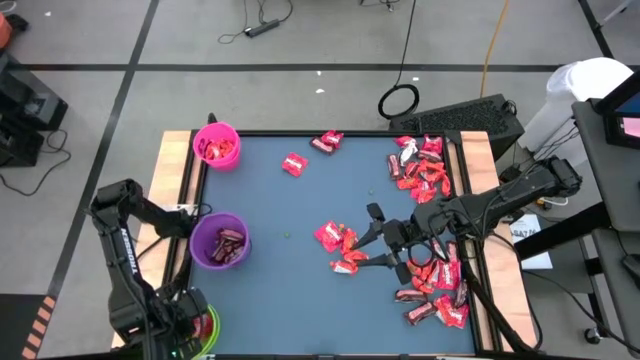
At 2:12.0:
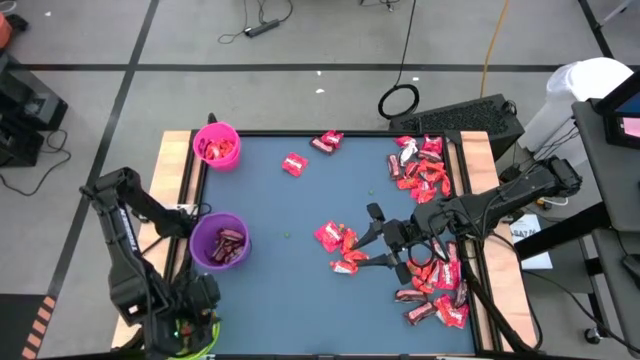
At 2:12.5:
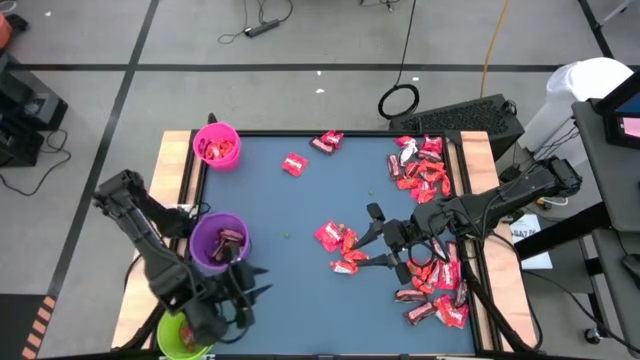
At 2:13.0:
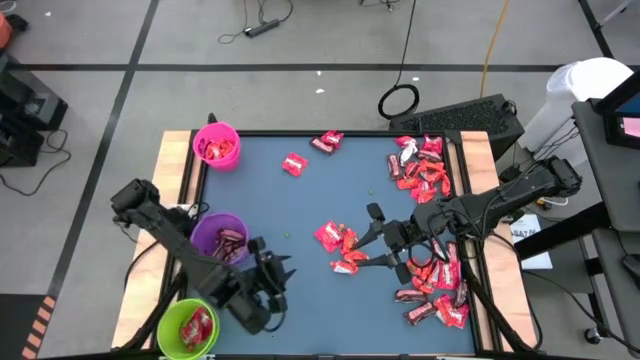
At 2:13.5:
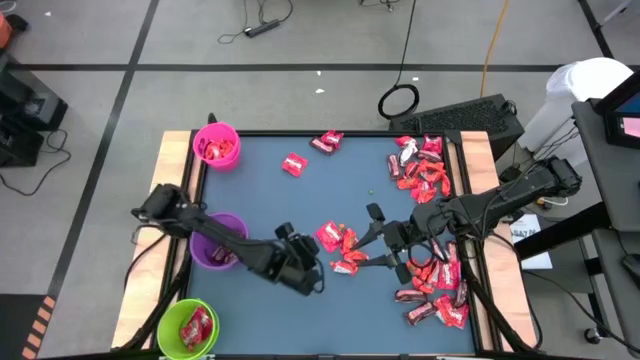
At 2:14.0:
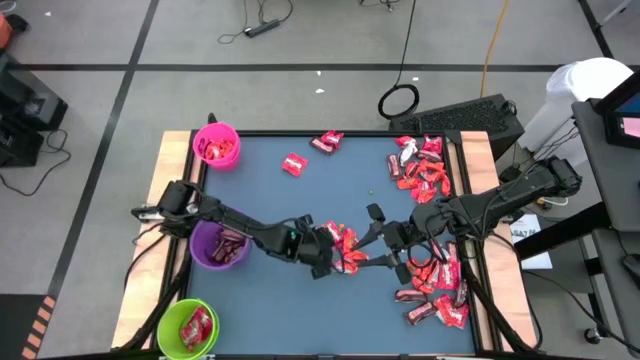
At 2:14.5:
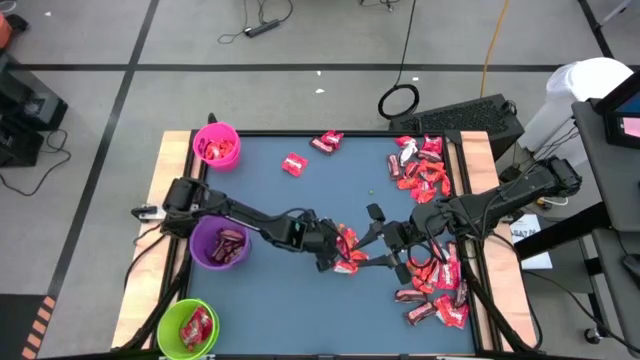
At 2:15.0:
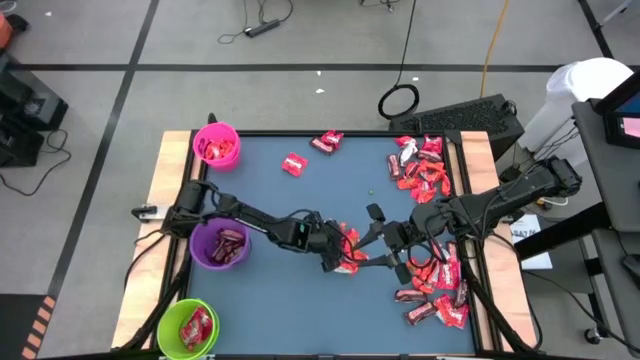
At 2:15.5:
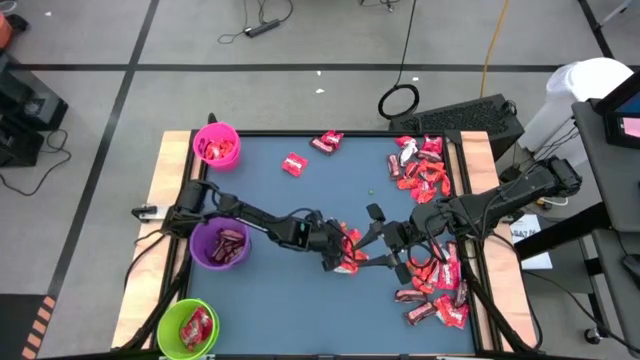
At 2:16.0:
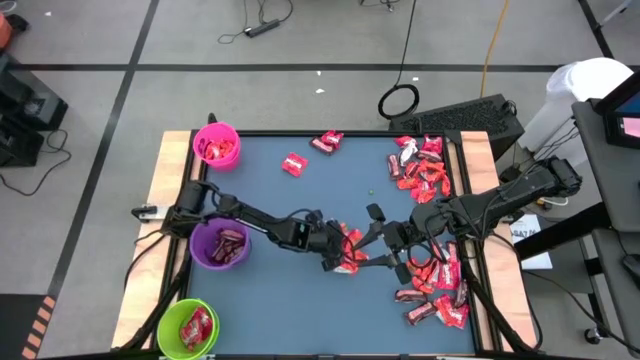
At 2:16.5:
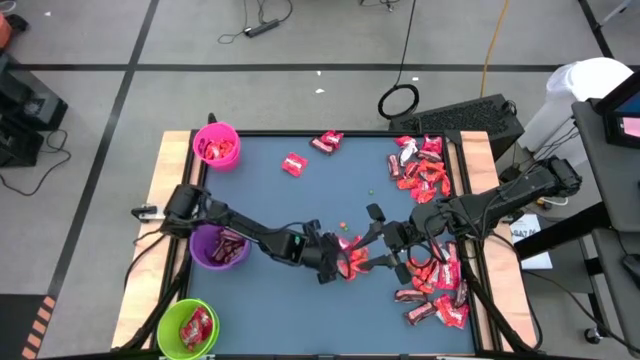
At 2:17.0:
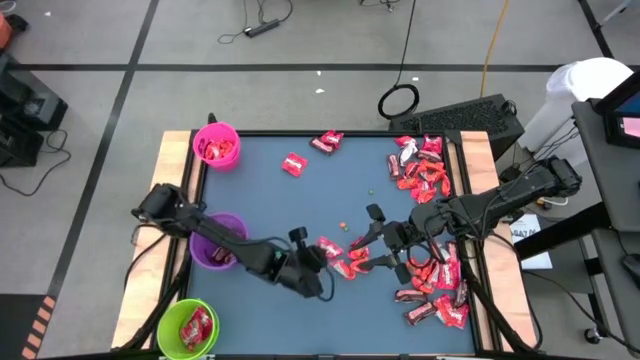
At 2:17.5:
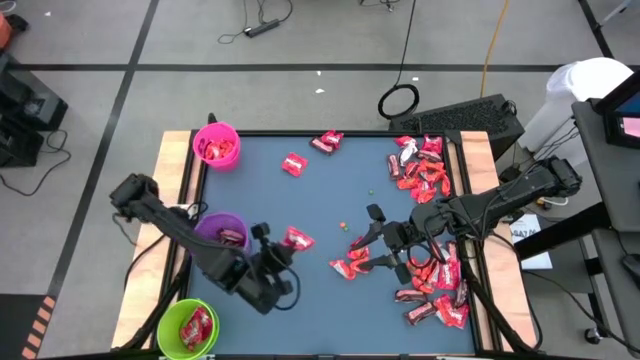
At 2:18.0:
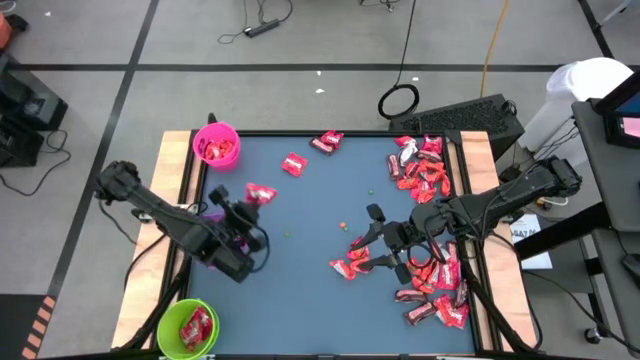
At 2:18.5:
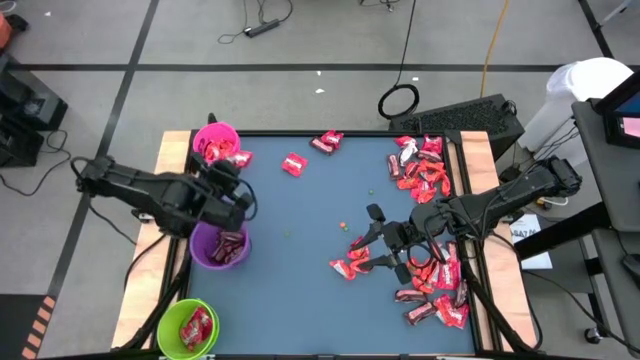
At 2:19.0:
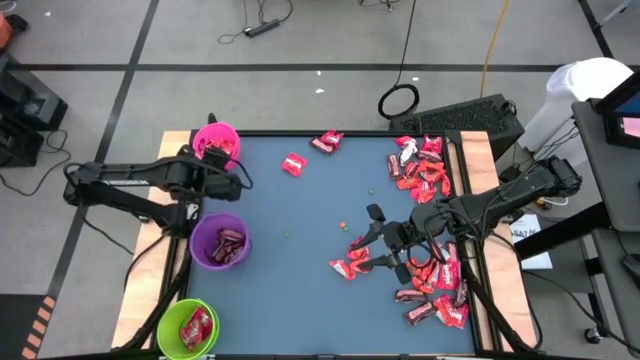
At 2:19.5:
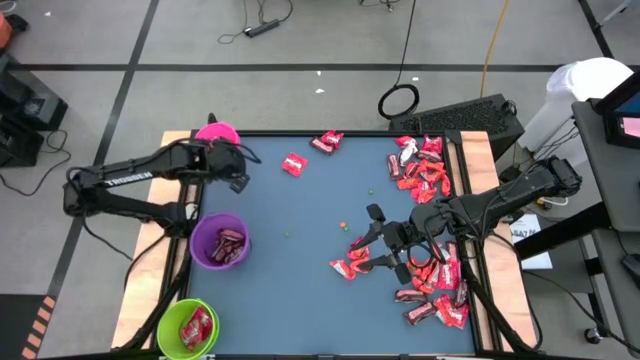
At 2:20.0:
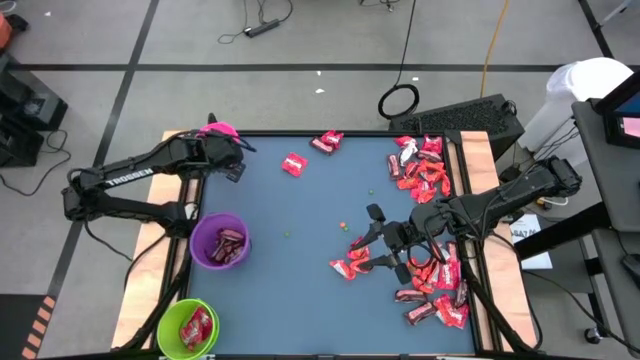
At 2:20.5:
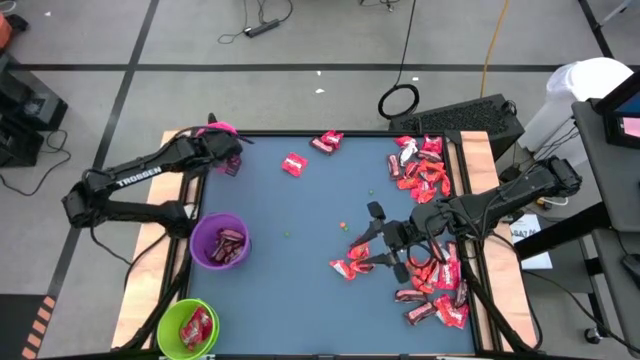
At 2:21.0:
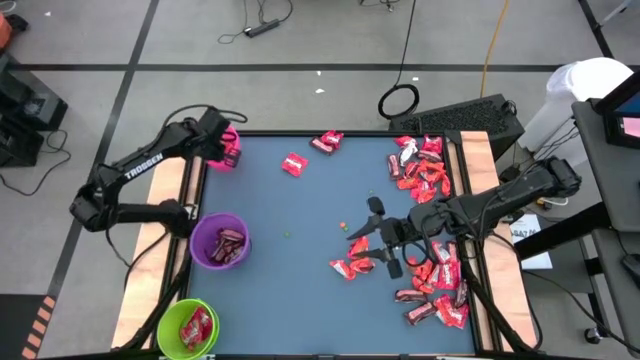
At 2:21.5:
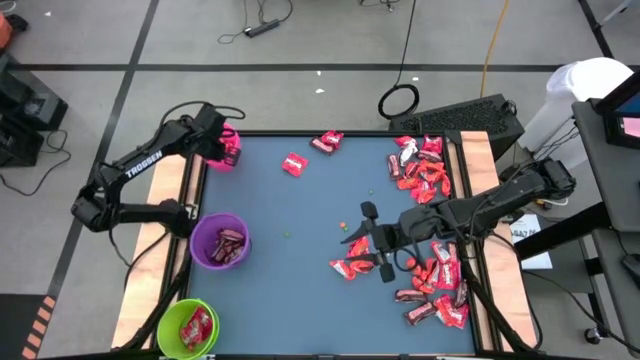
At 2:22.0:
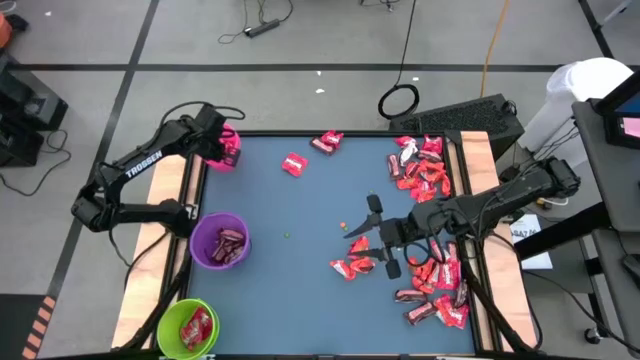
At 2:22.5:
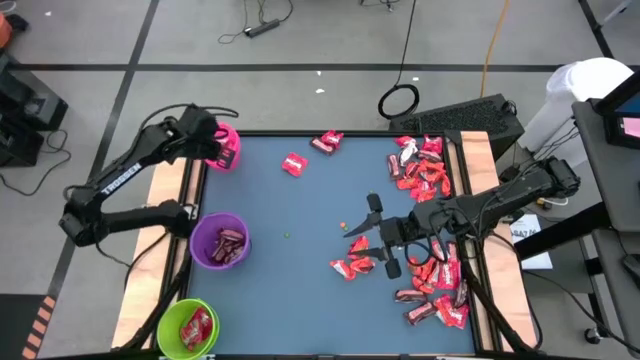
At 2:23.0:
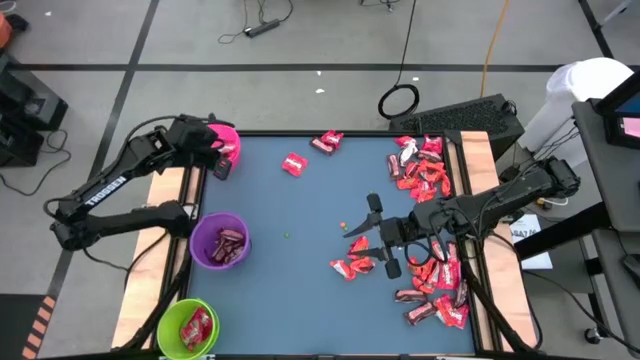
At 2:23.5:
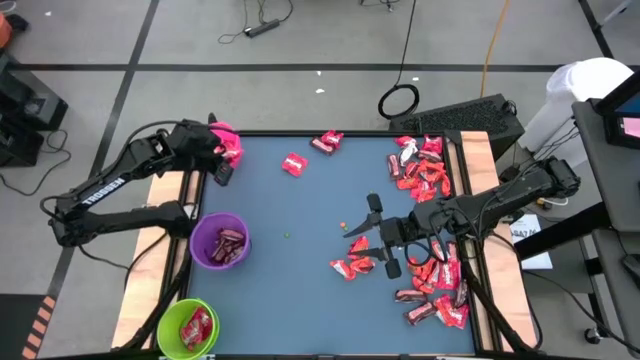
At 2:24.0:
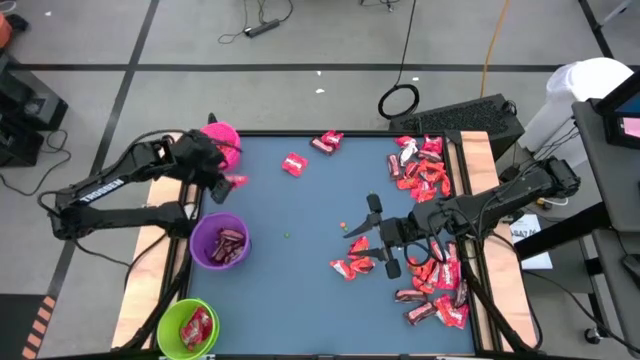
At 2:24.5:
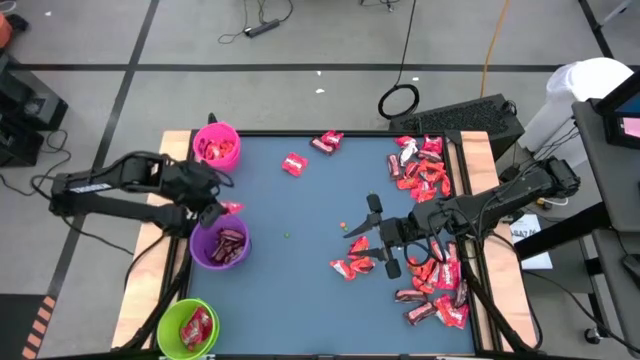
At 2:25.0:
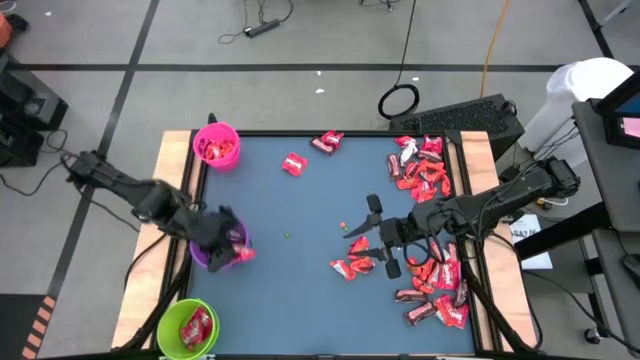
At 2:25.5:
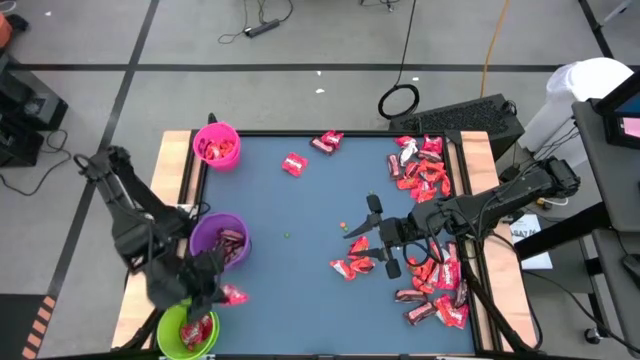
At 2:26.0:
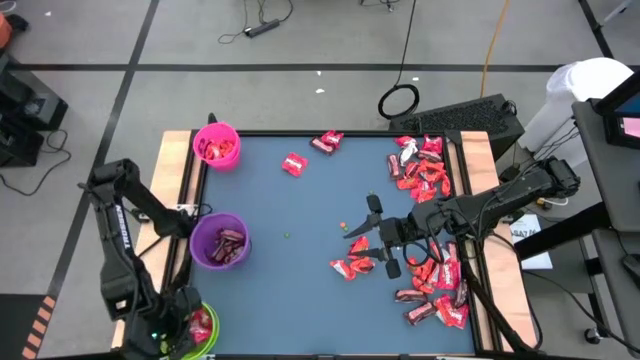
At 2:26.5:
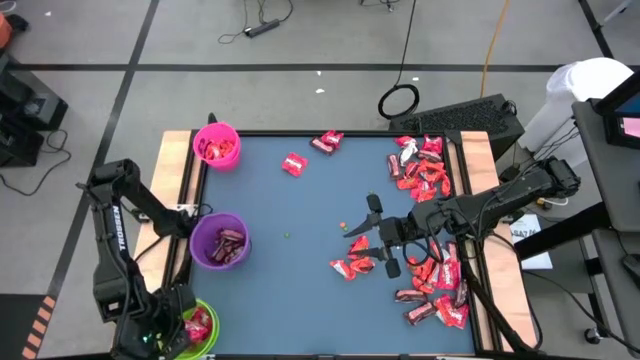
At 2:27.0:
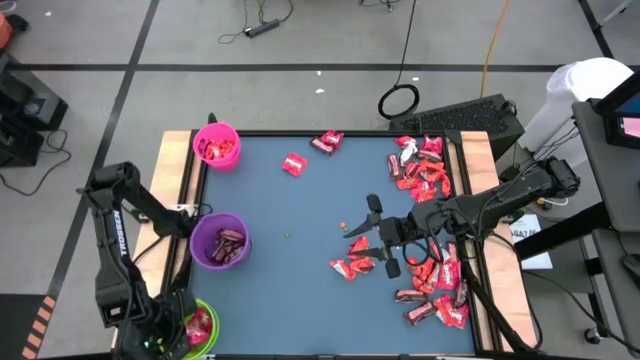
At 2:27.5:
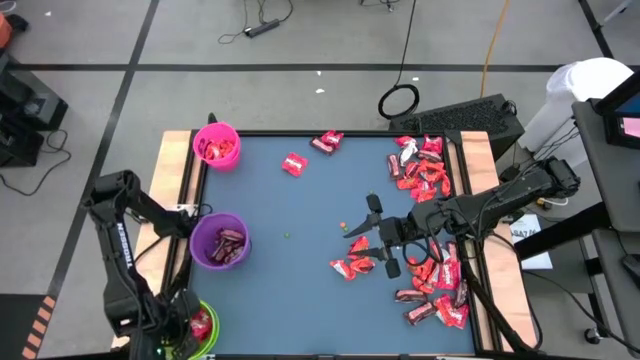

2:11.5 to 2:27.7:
Task: Organize candy in baskets
Put the red candy into the green bucket

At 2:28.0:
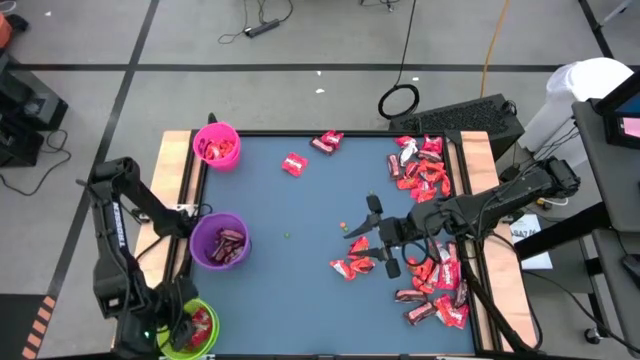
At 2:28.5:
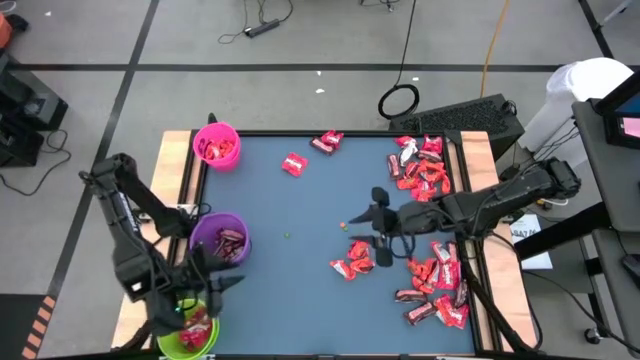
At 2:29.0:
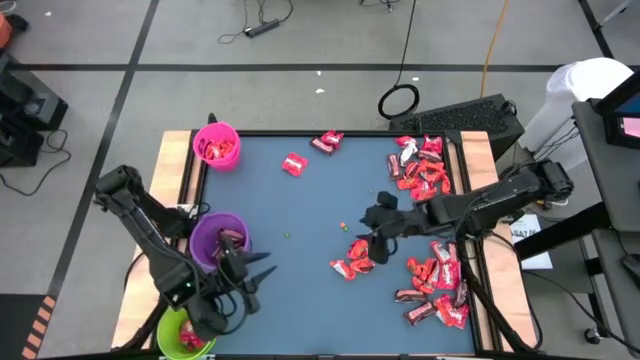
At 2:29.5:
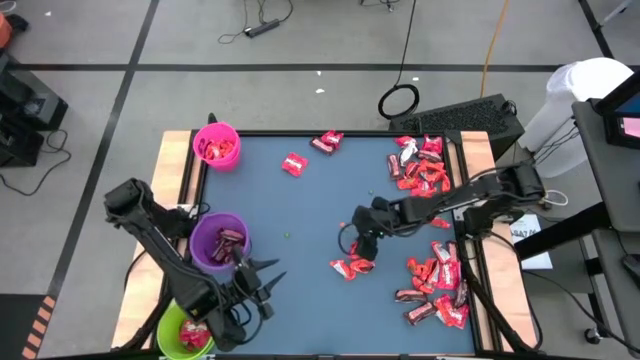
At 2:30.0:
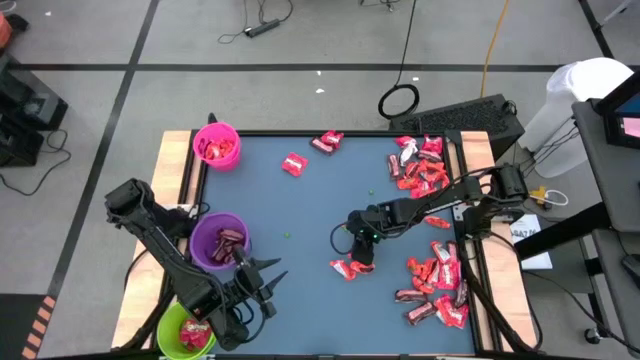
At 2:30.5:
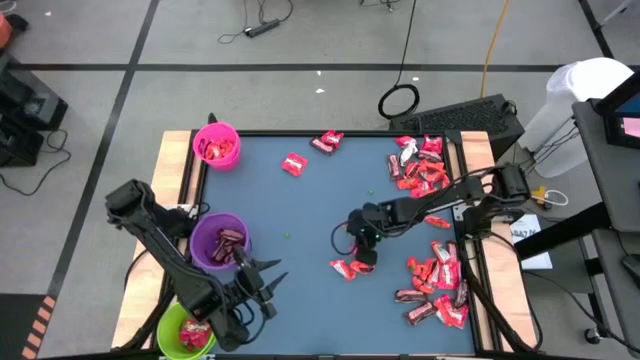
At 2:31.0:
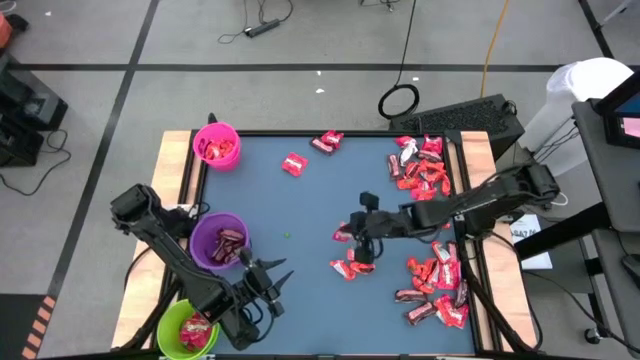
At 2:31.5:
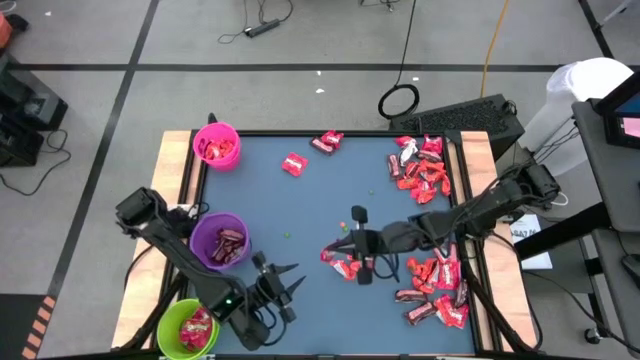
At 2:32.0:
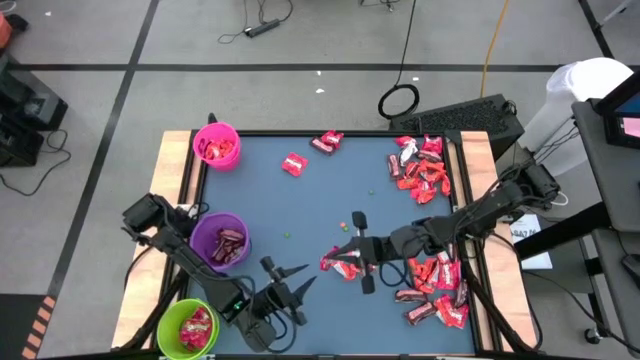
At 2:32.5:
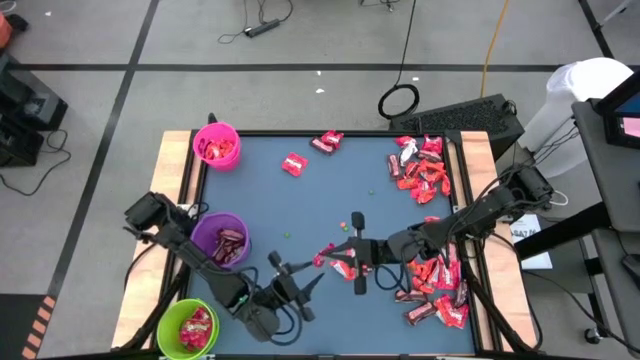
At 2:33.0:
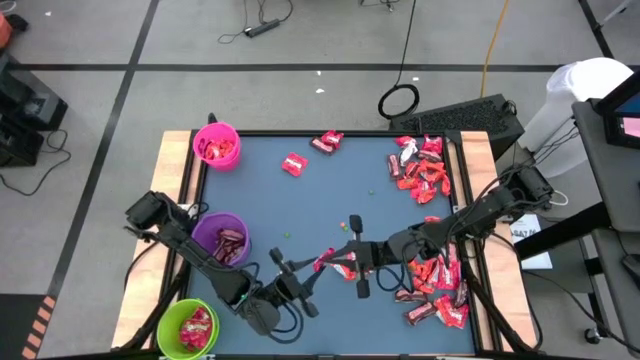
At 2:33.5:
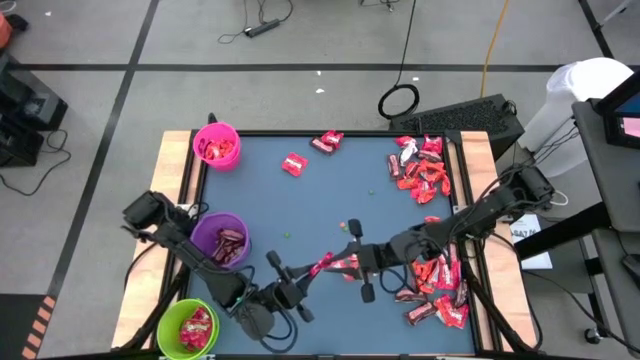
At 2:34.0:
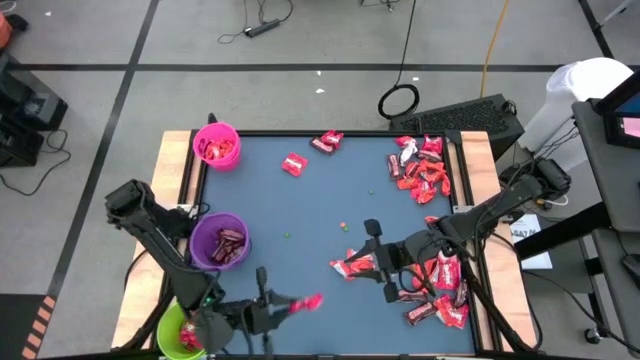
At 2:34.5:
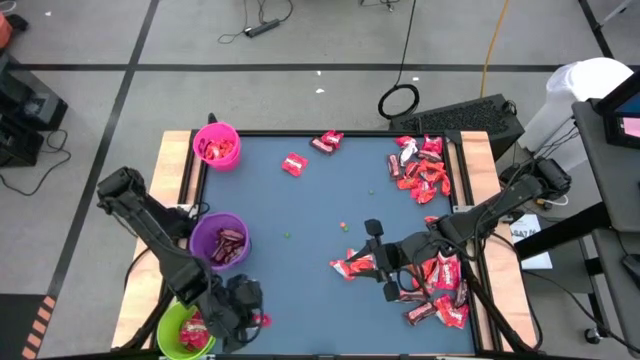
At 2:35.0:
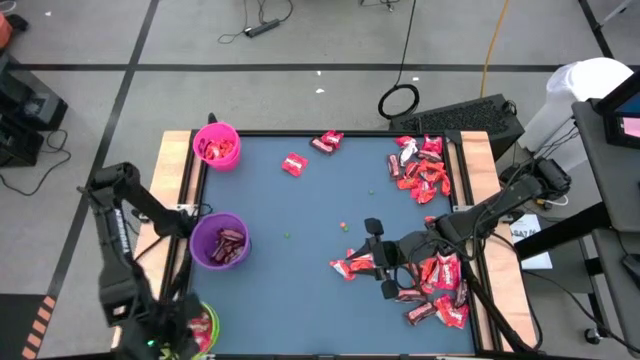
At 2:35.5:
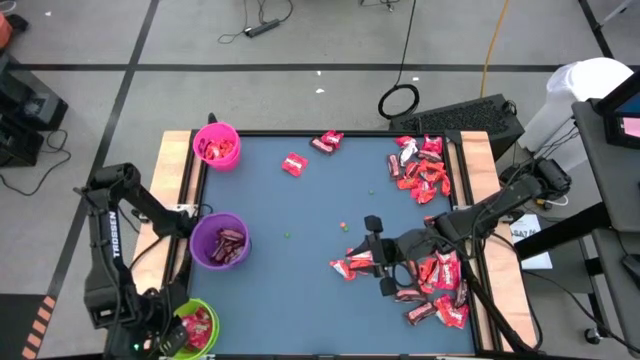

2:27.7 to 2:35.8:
Put the red candy into the green bucket
